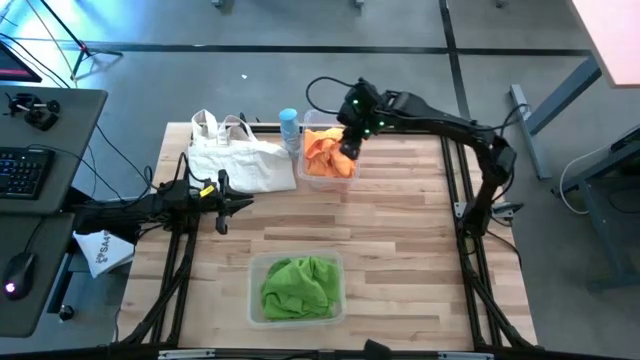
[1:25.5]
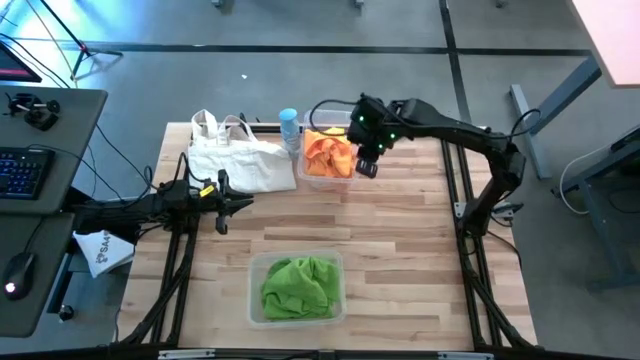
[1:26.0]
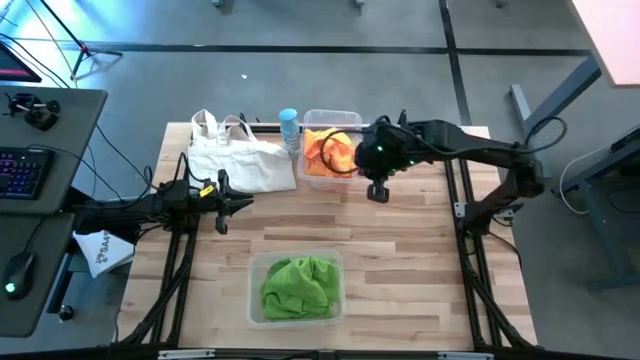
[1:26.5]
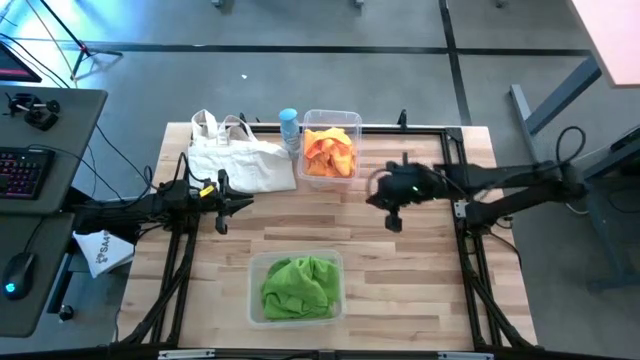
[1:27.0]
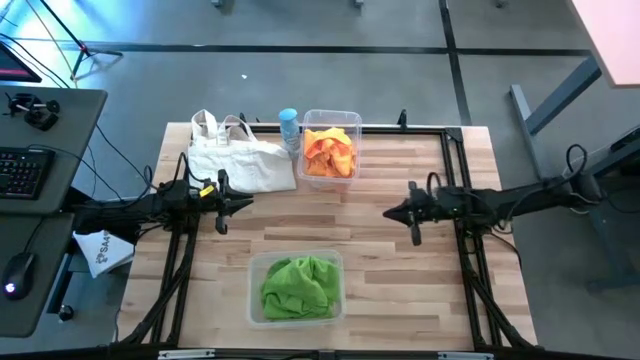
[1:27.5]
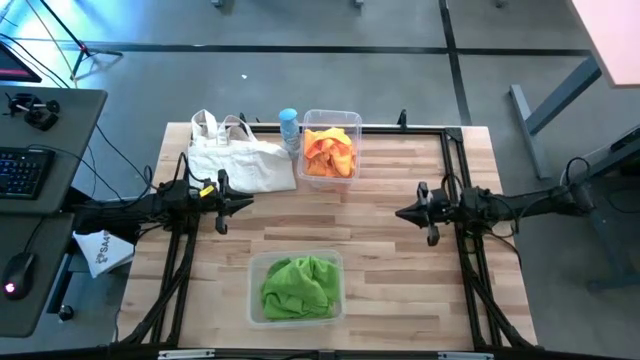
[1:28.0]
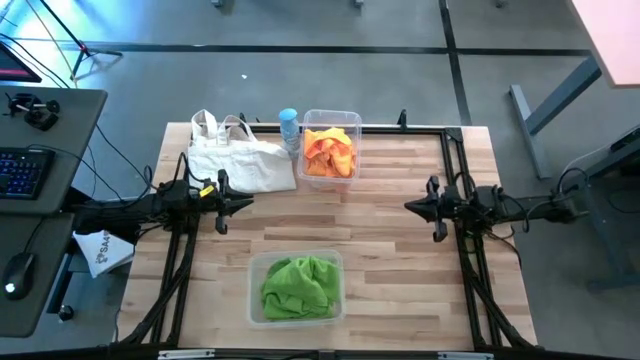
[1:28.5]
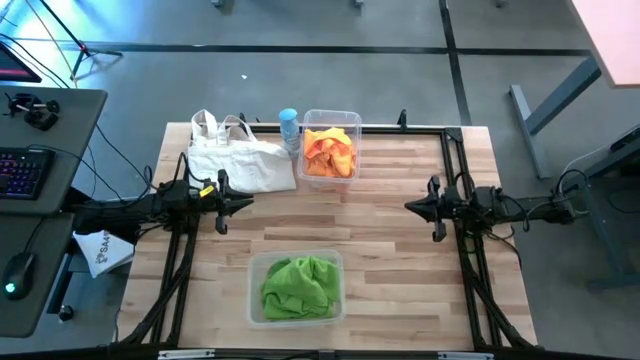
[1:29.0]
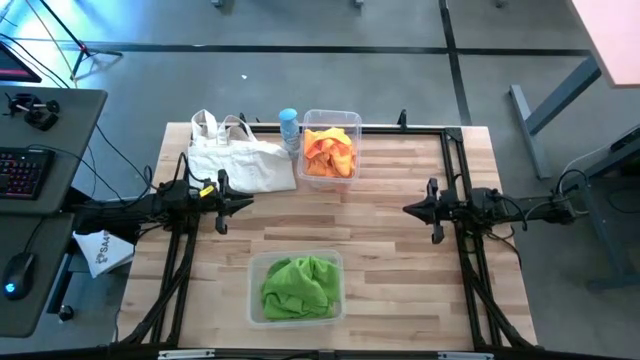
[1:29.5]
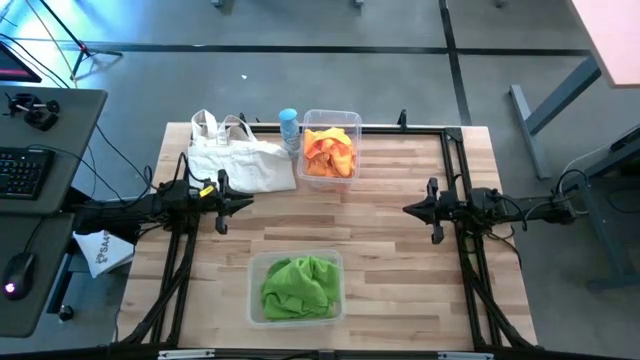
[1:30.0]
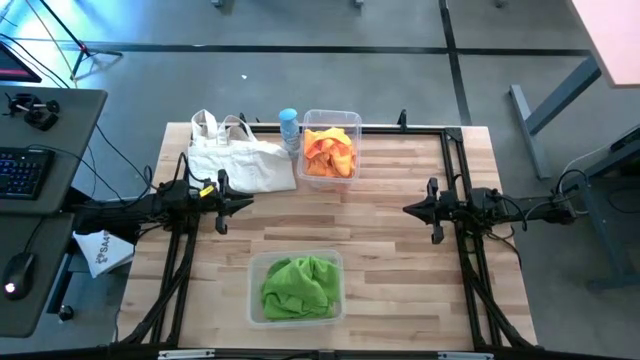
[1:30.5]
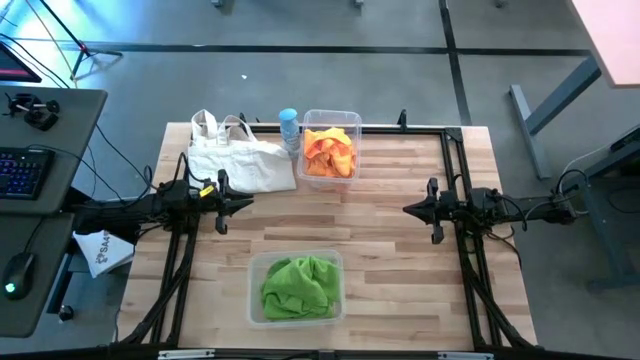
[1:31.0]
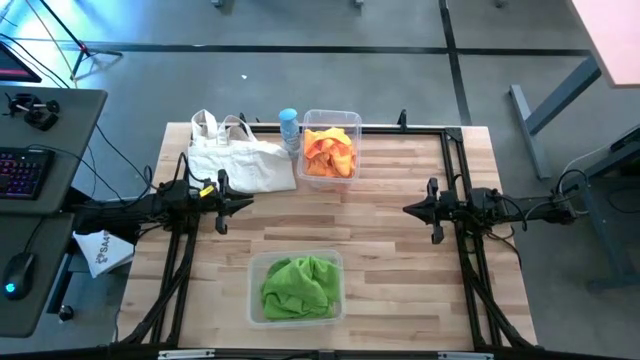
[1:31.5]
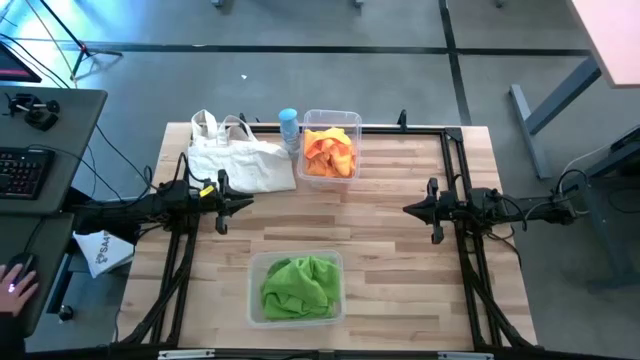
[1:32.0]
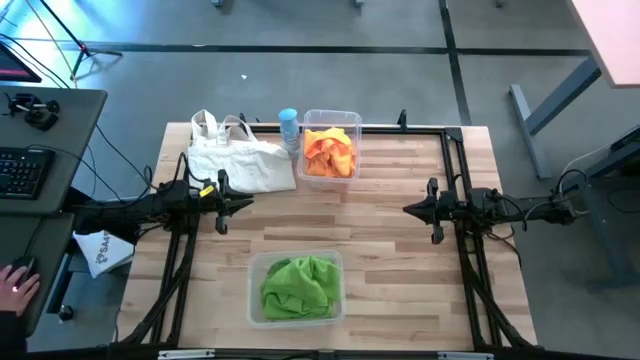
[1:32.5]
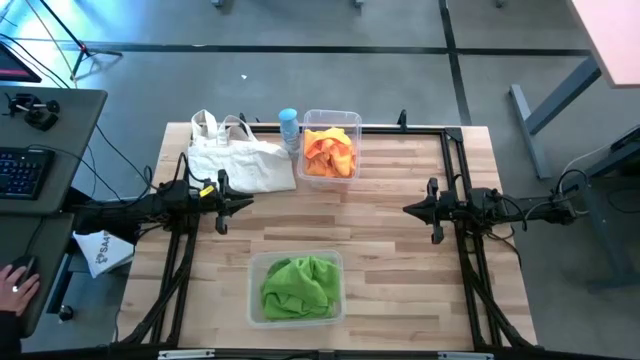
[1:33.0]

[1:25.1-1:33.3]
Task: Sort microfiber towel by color & place in baskets
Return to Home Position

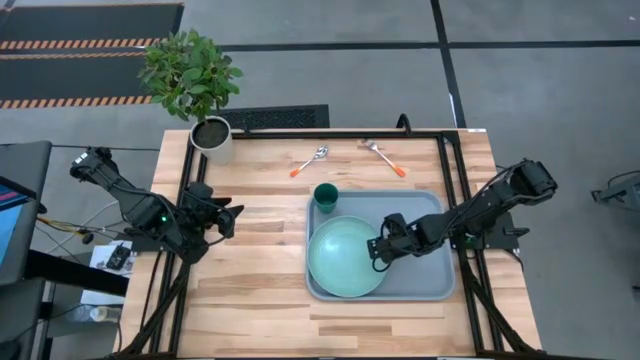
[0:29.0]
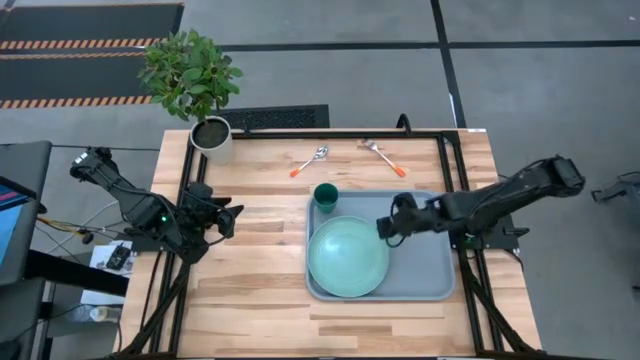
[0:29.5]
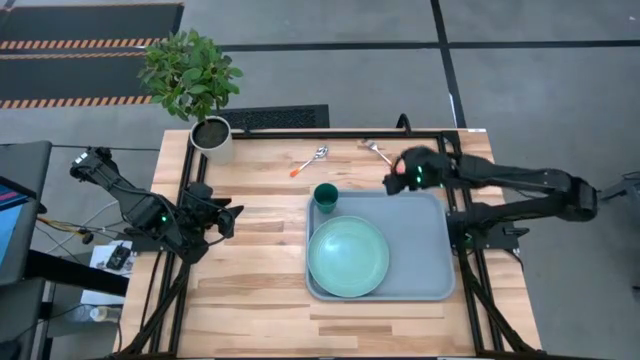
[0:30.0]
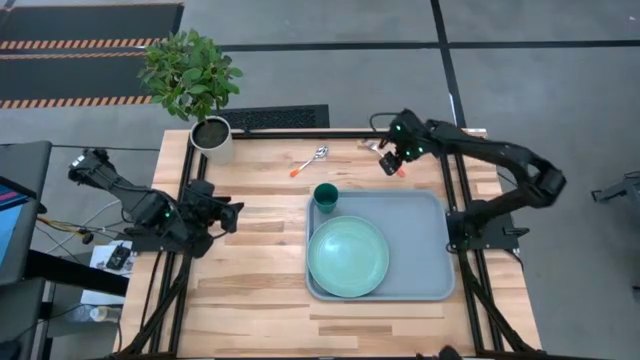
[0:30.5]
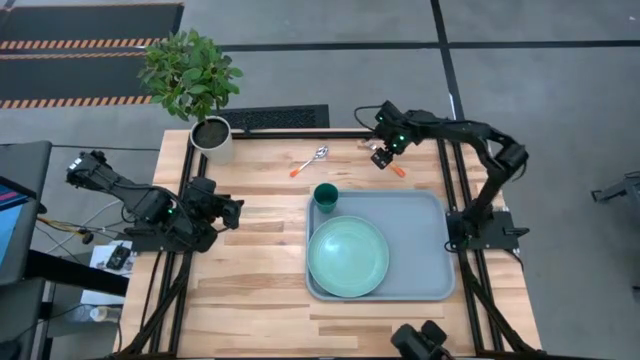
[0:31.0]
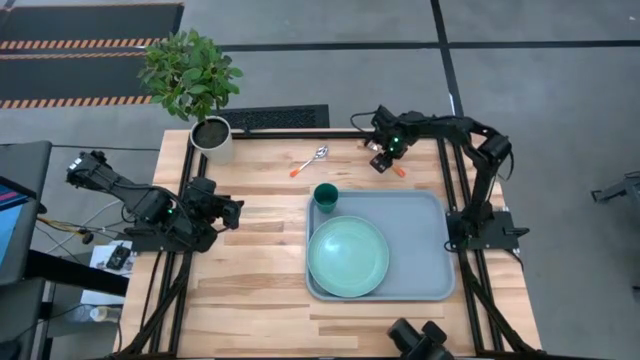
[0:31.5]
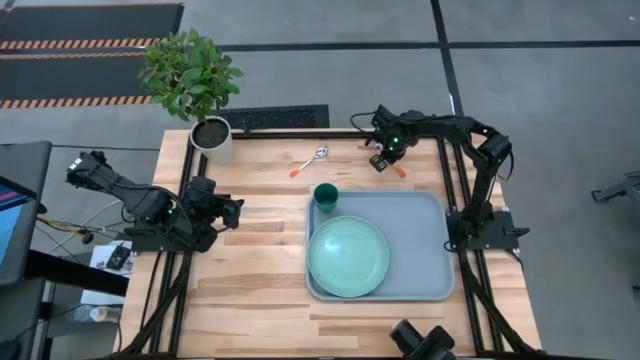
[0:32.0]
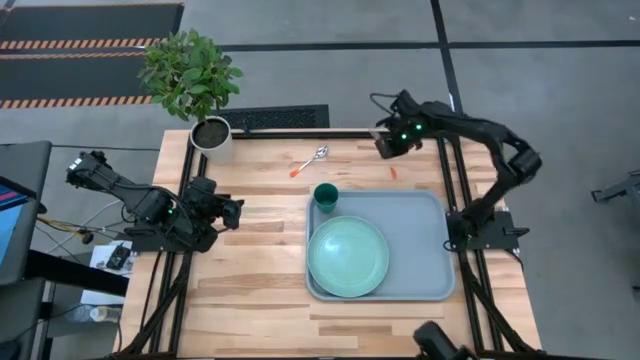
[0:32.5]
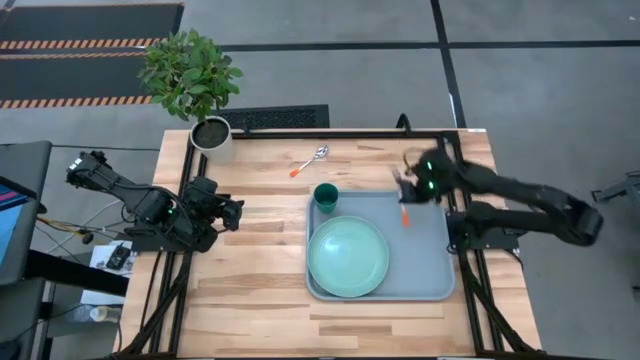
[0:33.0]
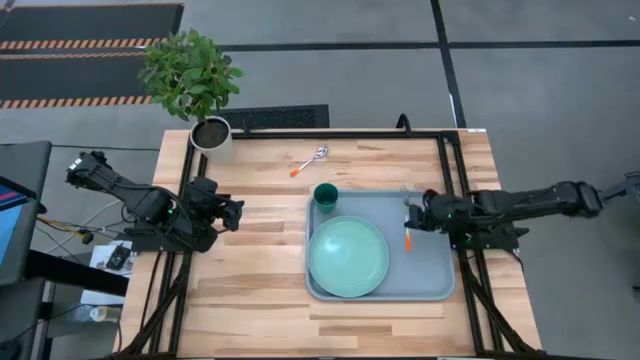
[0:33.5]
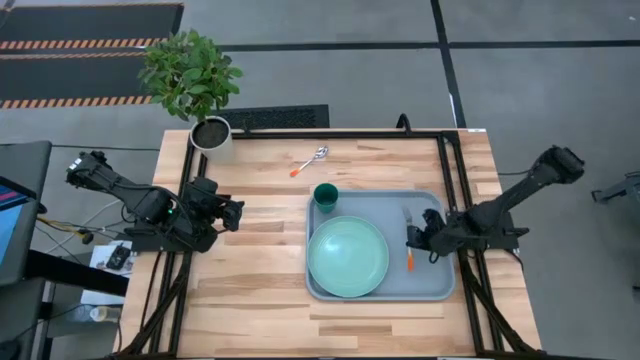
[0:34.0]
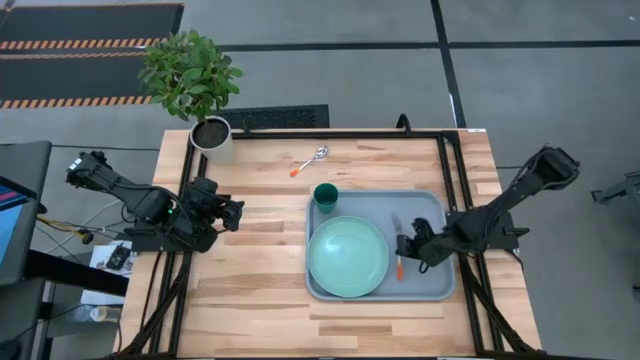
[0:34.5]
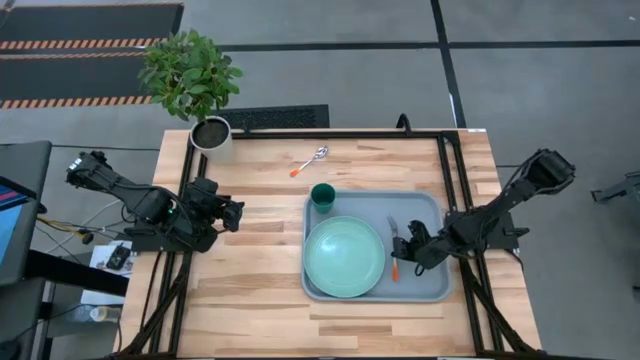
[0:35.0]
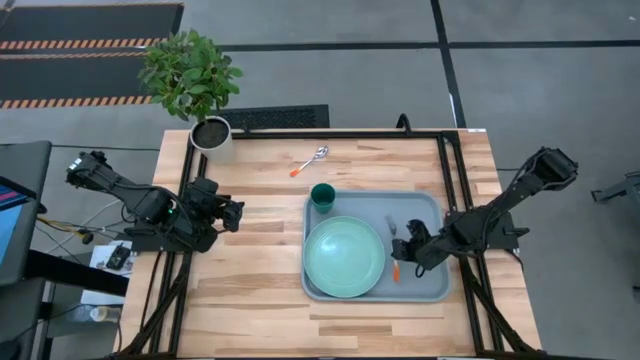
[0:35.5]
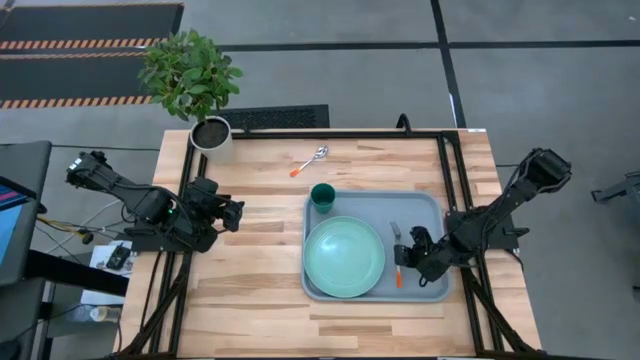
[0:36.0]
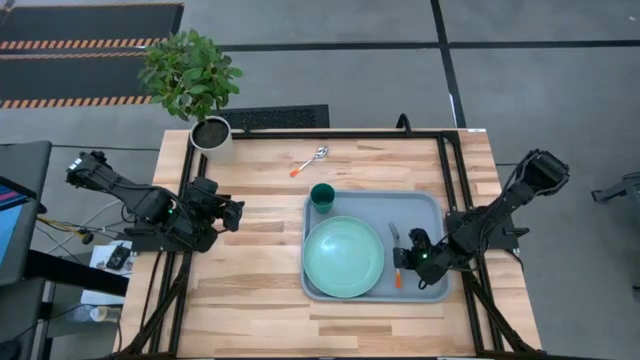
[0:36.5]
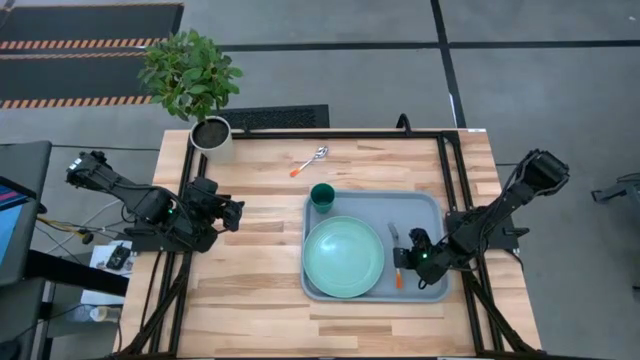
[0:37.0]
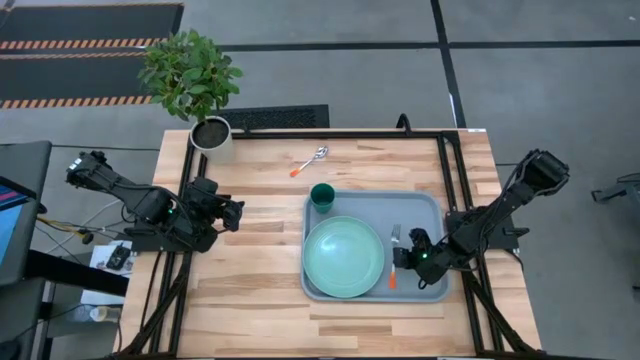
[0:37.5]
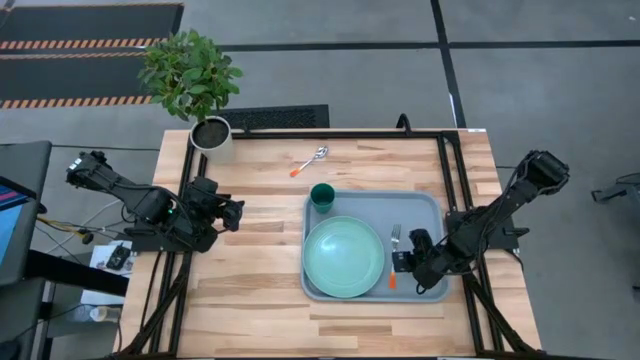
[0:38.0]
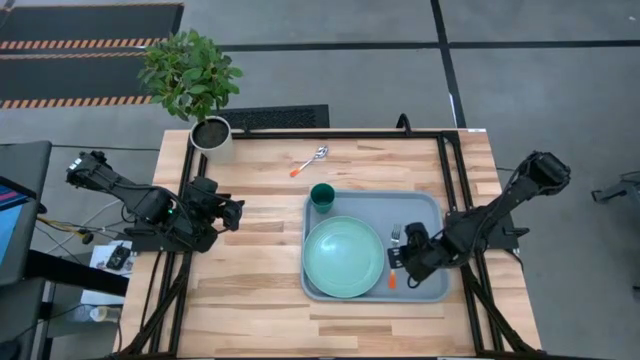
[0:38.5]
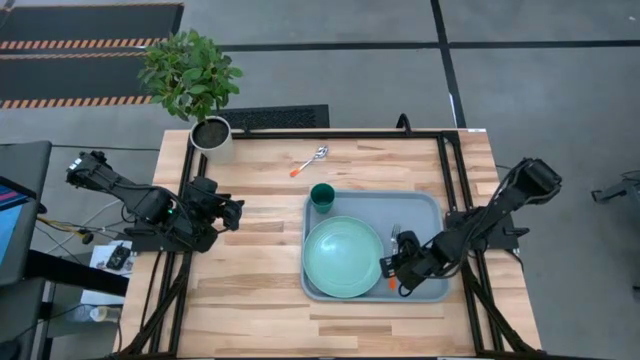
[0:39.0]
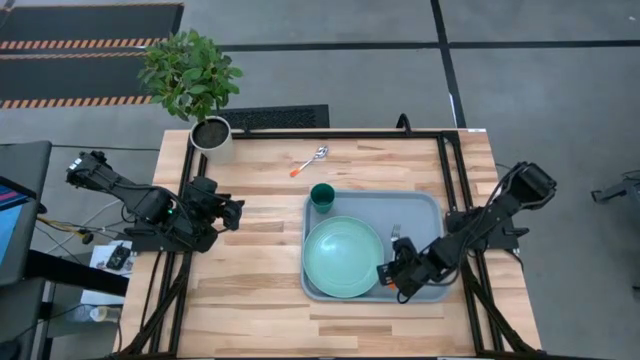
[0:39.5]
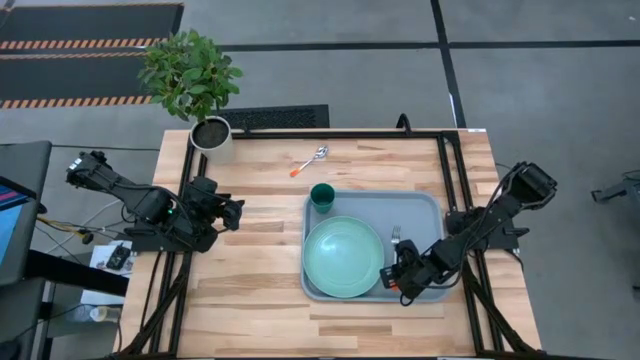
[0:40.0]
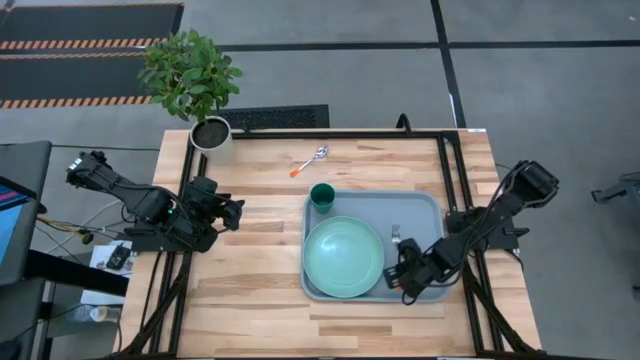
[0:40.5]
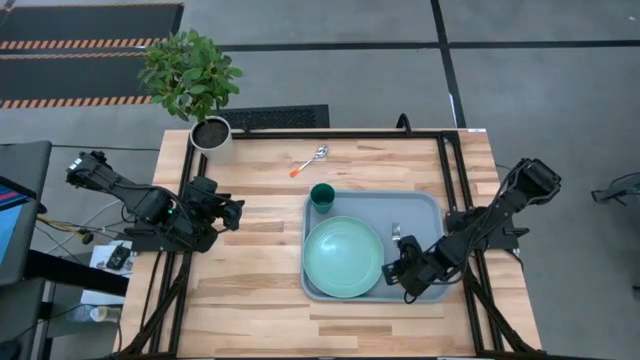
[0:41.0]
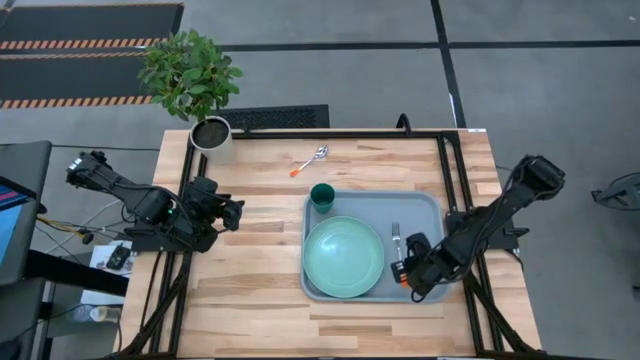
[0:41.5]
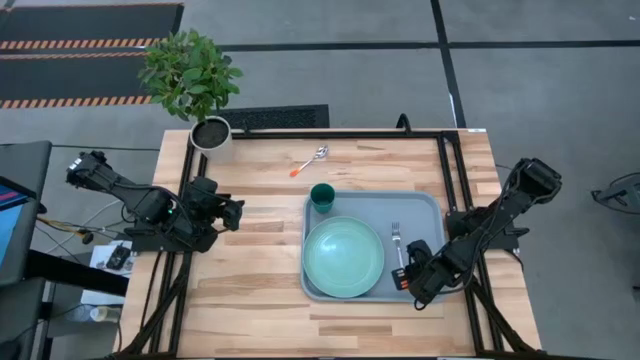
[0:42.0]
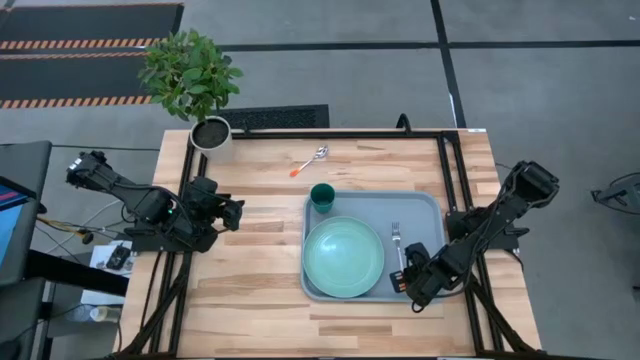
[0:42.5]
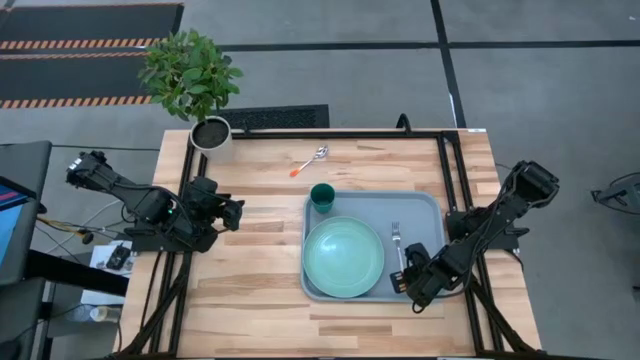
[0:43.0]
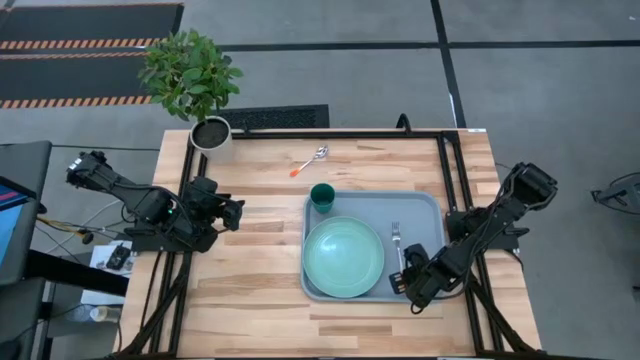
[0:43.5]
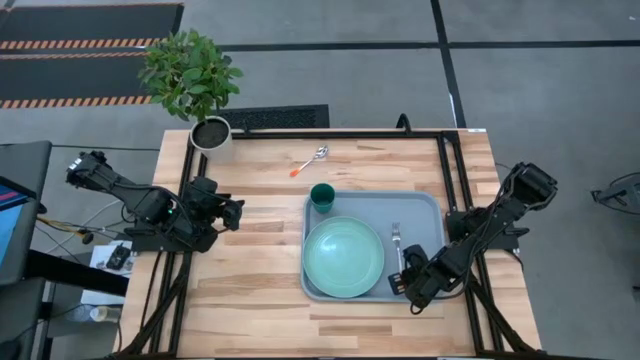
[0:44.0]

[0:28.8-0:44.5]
Task: Pick and place plate/cup/fork/spoon on tray
Put the orange fork on the blue tray to the right of the green plate
